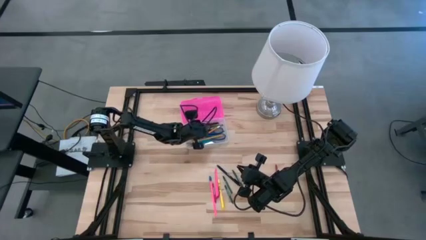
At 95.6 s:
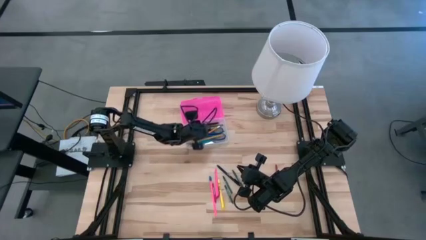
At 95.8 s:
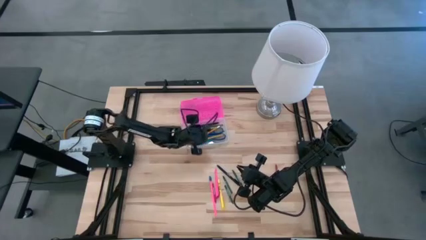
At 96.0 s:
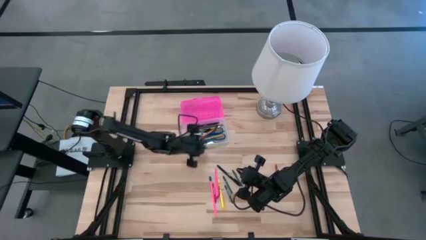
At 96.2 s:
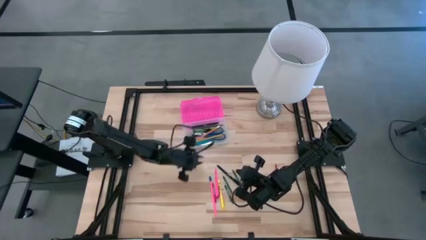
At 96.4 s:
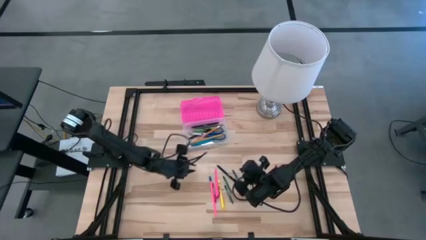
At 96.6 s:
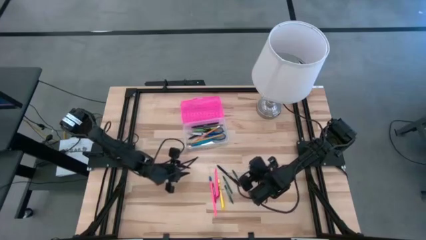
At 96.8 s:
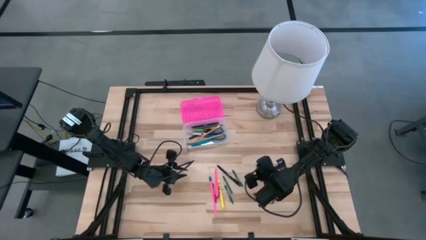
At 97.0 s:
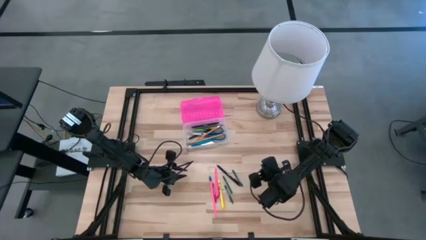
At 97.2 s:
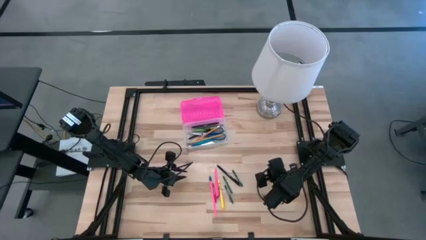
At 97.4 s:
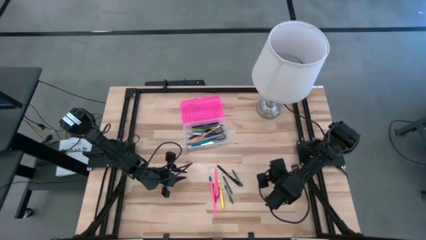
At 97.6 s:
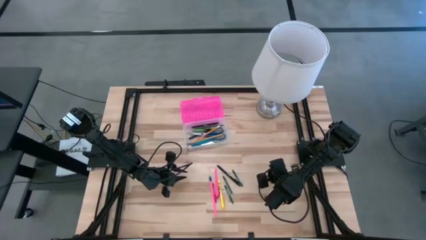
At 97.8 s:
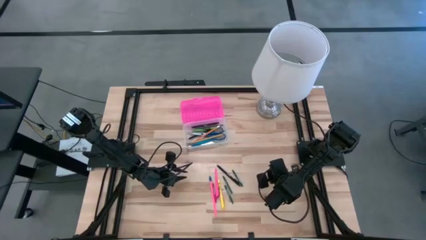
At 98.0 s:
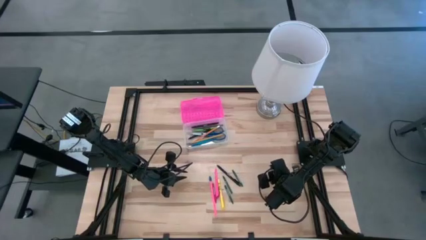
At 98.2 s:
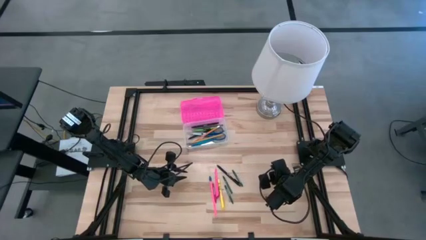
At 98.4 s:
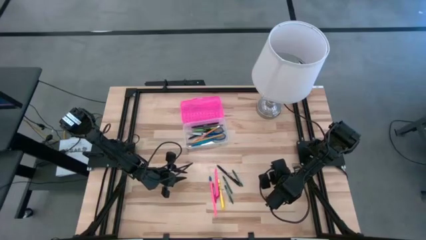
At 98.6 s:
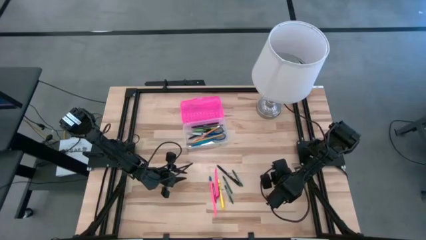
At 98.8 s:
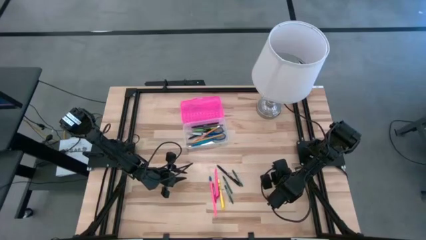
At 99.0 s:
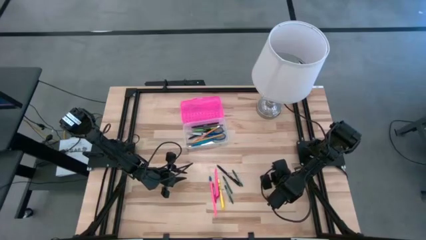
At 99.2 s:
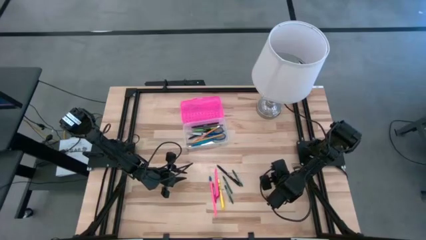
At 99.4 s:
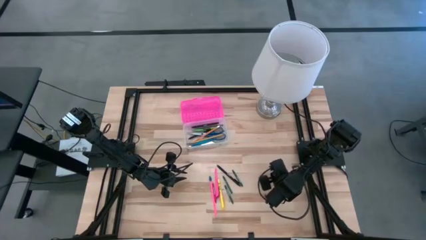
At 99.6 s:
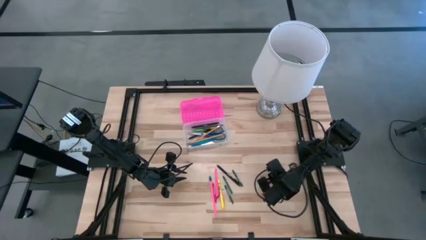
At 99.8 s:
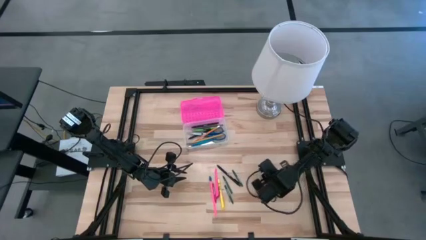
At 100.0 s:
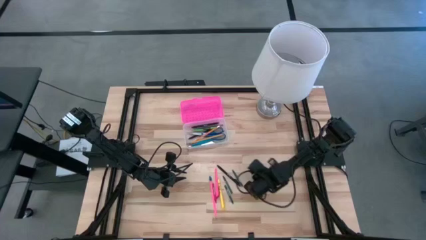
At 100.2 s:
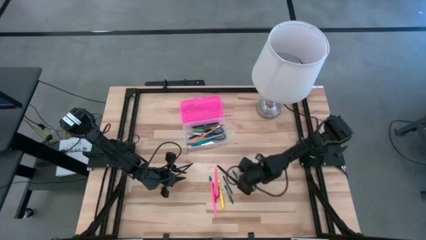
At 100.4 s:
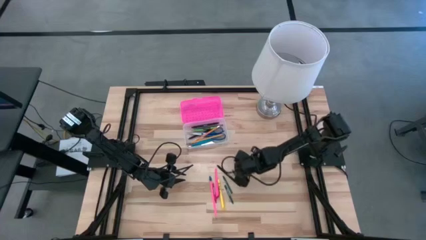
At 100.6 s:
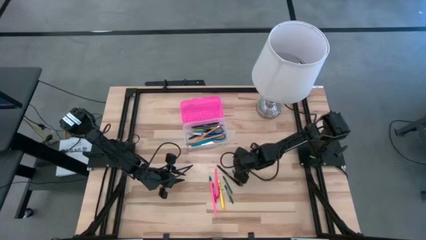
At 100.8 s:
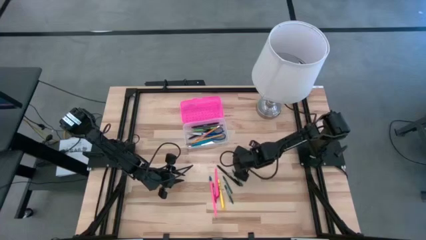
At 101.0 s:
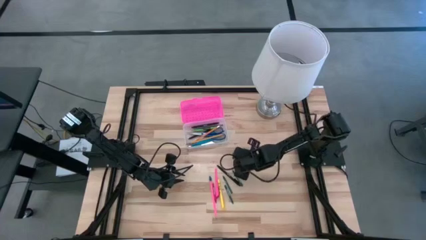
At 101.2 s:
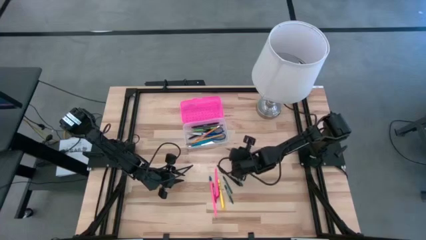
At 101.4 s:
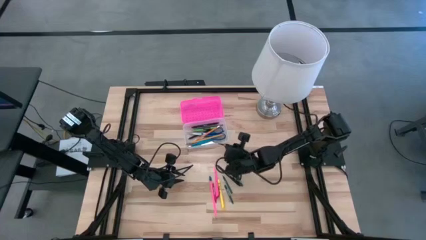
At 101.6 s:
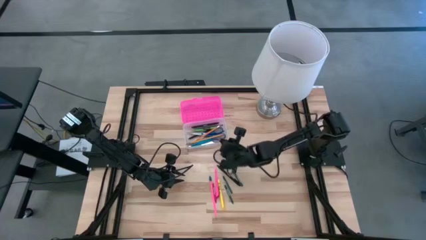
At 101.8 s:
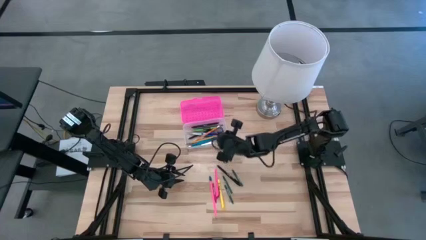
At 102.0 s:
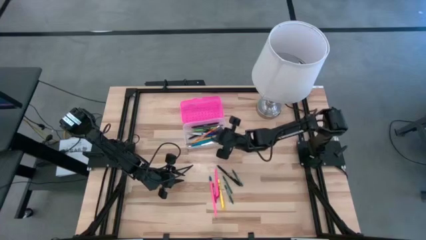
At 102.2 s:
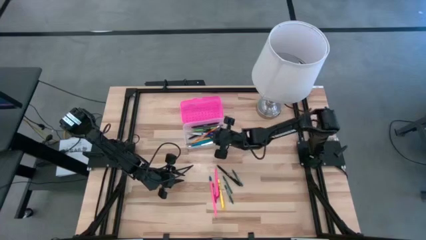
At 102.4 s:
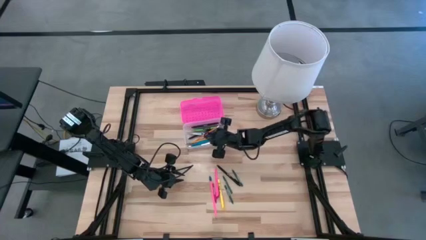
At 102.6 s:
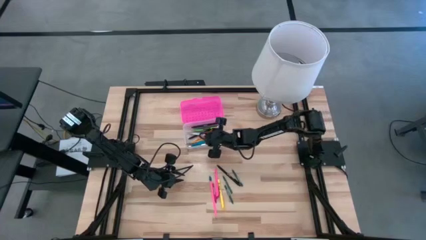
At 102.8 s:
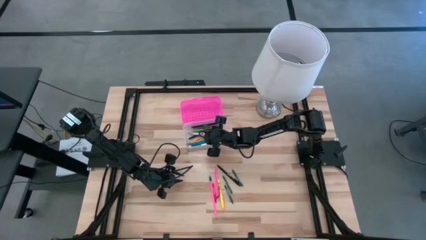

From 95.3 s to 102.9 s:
Task: Pick & place school supplies into a supply box
Put the red crayon into the pink supply box

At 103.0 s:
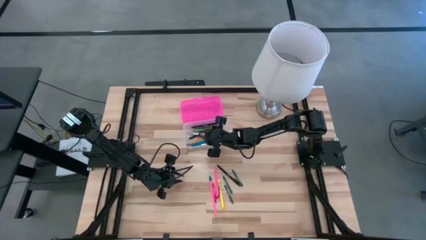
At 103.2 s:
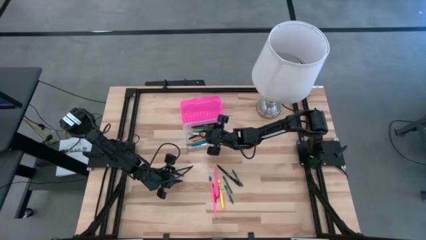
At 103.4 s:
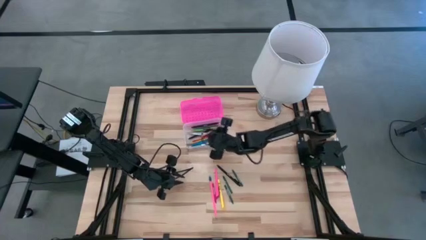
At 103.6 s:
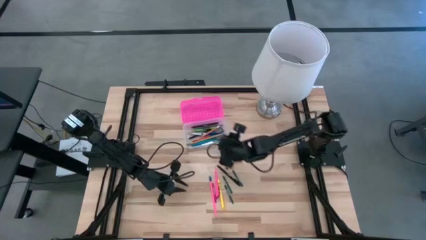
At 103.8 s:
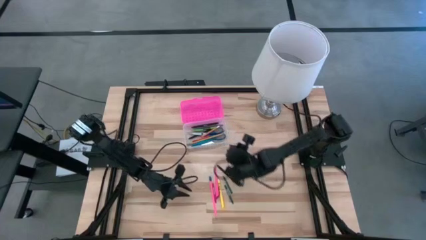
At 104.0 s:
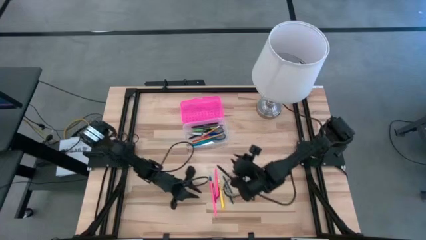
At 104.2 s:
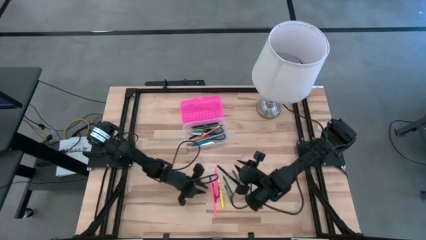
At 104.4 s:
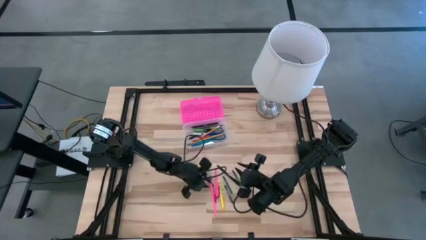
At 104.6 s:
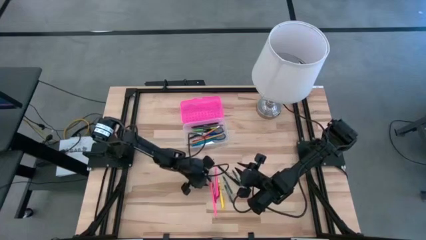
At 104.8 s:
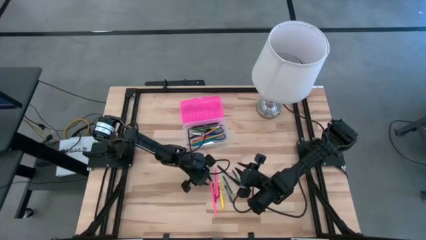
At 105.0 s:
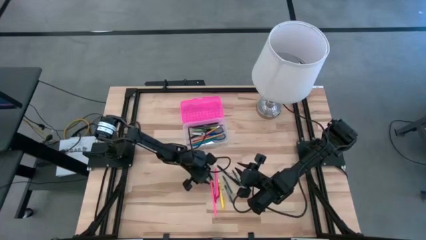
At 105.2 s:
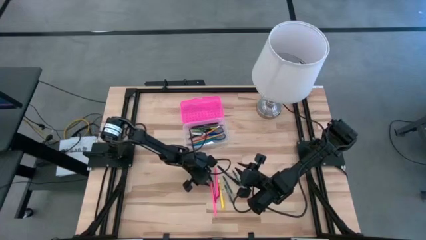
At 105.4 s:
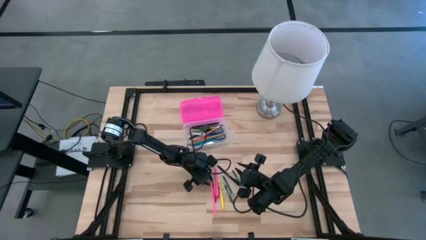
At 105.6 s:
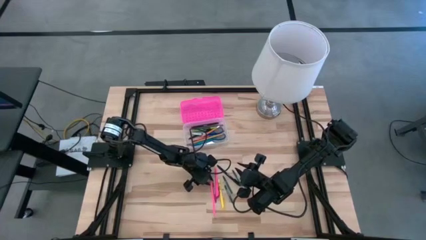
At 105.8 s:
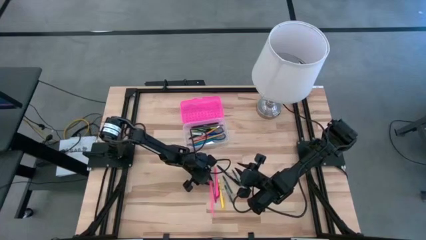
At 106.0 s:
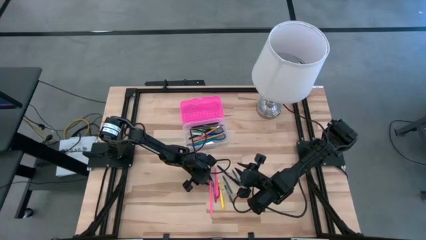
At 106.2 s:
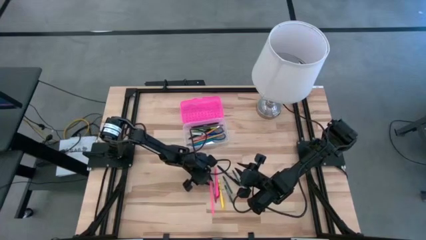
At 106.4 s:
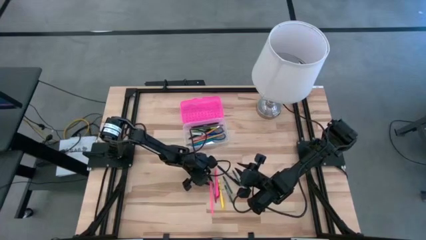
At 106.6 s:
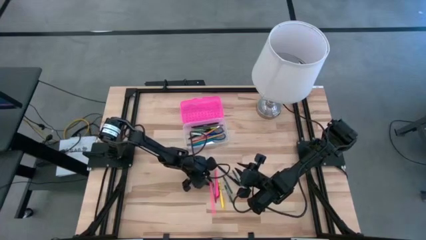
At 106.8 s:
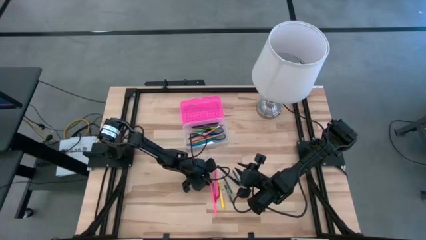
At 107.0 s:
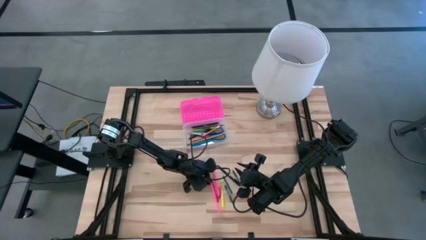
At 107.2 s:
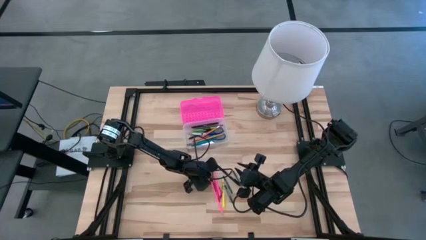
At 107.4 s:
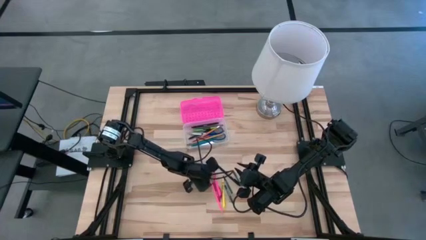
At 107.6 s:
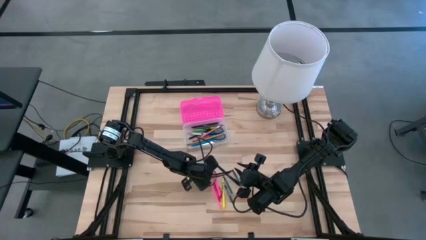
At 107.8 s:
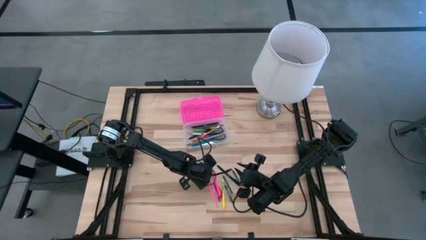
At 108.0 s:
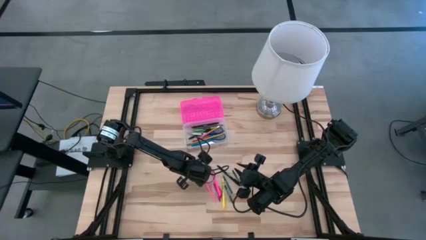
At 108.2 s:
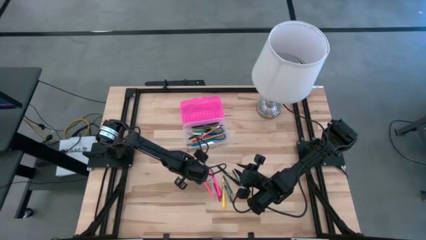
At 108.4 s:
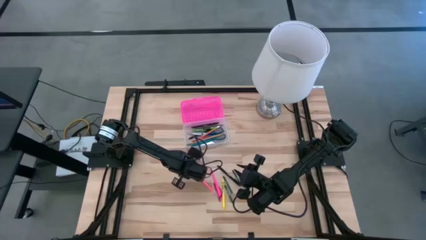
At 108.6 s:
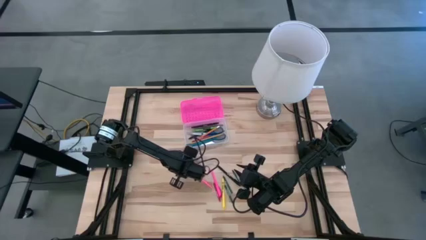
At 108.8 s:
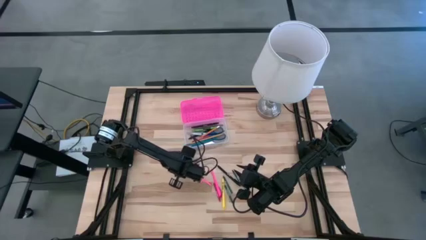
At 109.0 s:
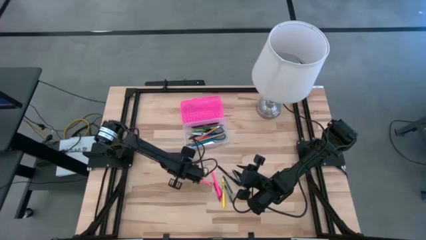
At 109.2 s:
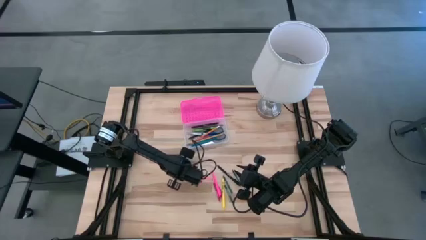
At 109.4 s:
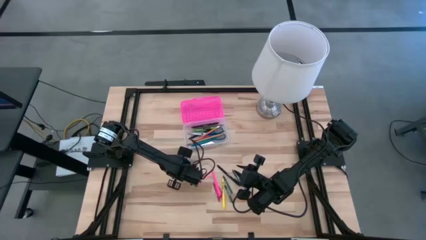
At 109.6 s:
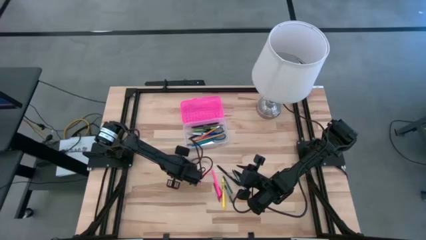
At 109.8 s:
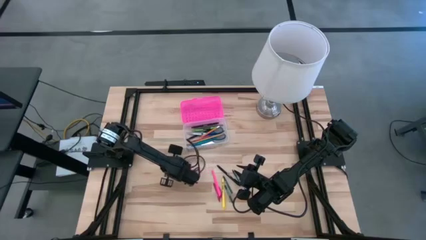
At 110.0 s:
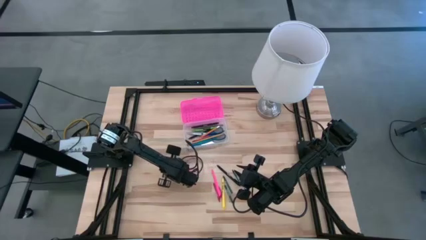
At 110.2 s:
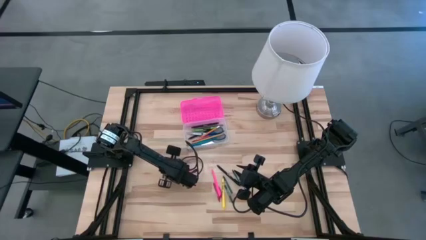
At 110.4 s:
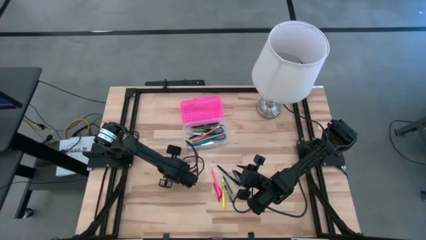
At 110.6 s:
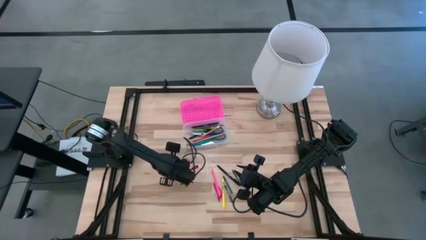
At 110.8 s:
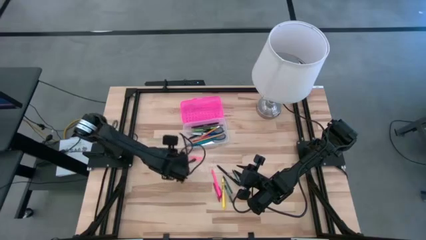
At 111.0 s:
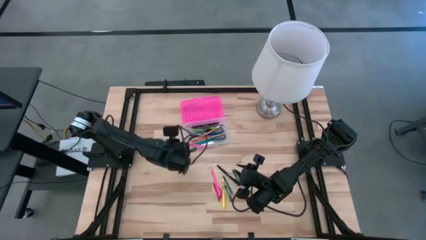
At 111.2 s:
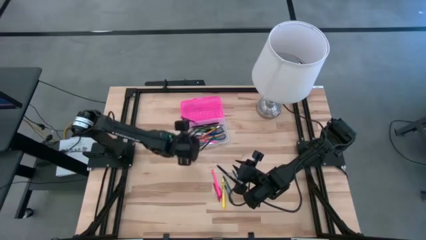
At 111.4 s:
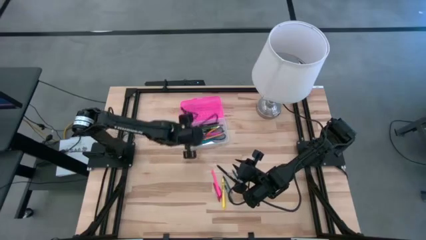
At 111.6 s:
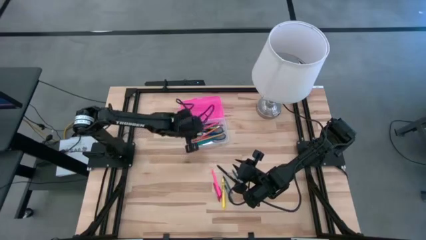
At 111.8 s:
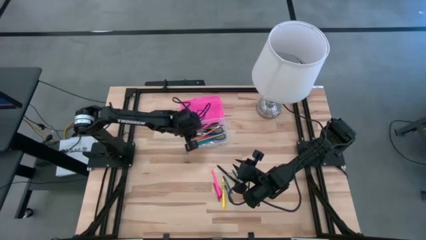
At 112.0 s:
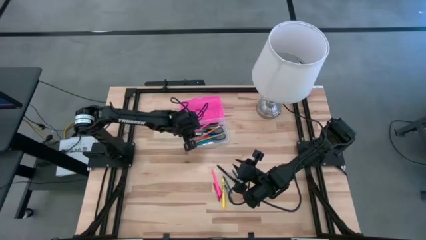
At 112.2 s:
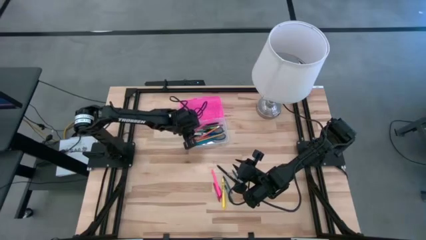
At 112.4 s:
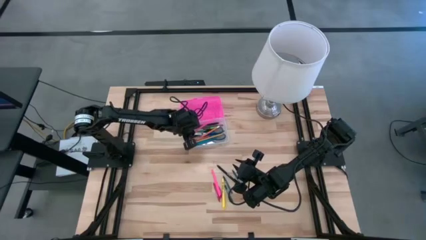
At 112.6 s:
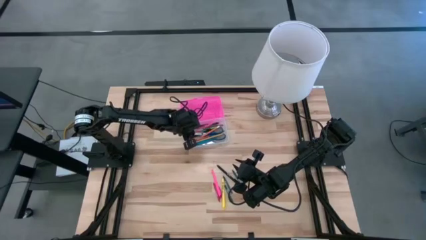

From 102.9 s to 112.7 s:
Put the pink pencil into the pink supply box
